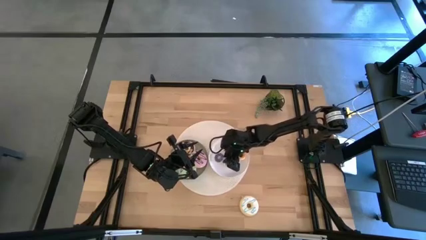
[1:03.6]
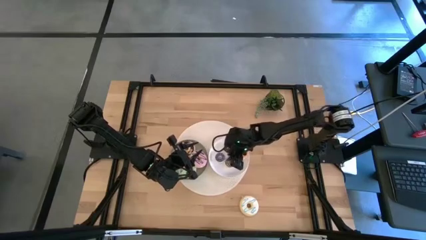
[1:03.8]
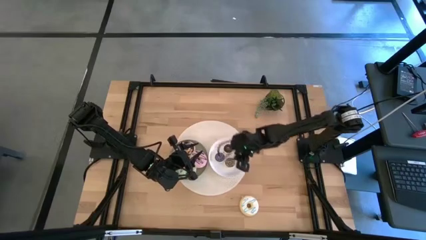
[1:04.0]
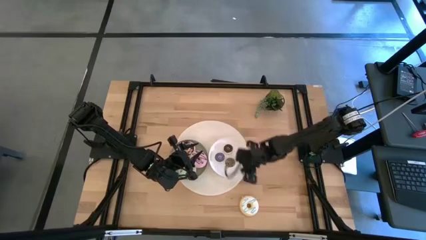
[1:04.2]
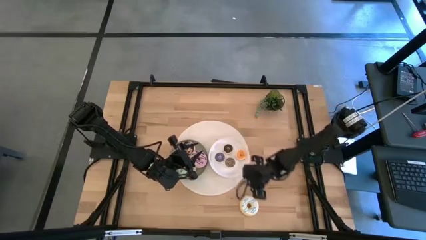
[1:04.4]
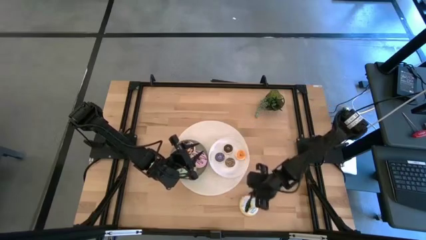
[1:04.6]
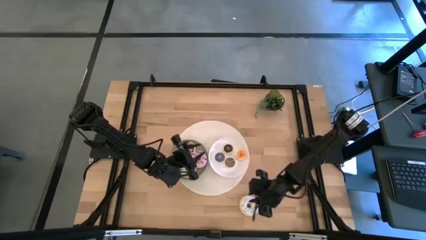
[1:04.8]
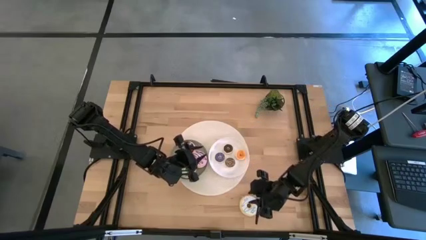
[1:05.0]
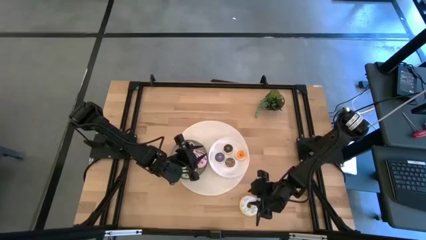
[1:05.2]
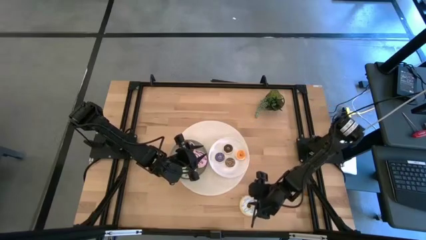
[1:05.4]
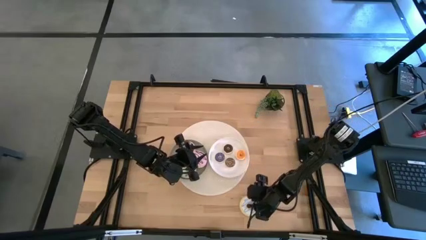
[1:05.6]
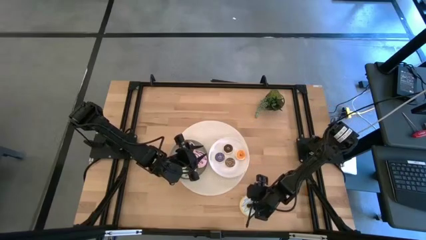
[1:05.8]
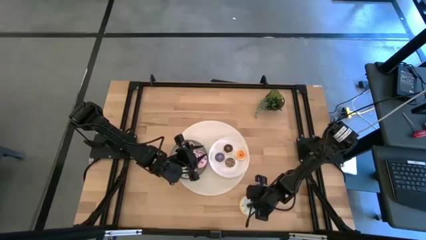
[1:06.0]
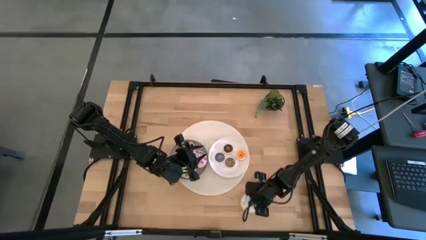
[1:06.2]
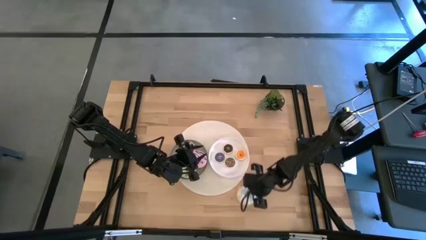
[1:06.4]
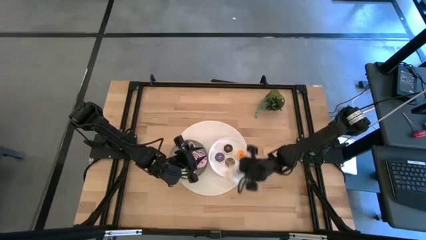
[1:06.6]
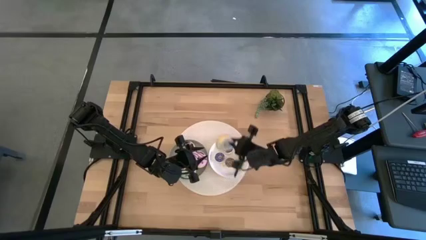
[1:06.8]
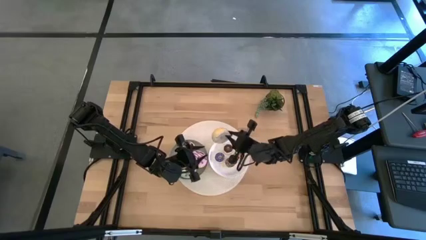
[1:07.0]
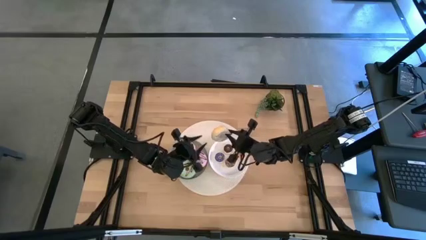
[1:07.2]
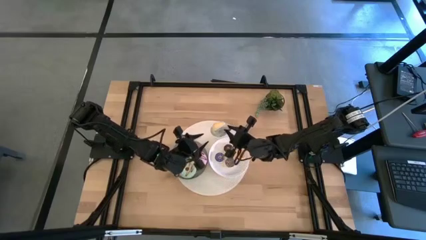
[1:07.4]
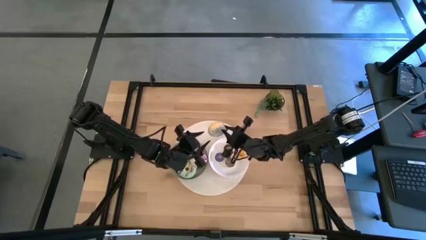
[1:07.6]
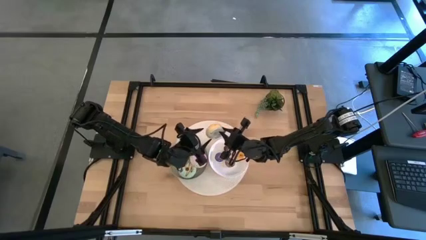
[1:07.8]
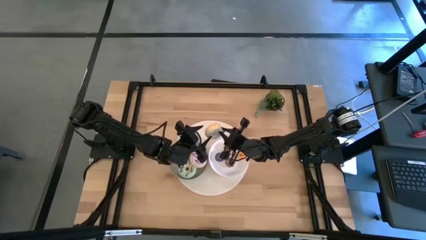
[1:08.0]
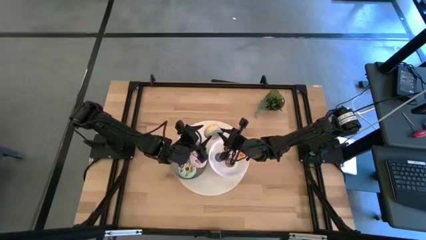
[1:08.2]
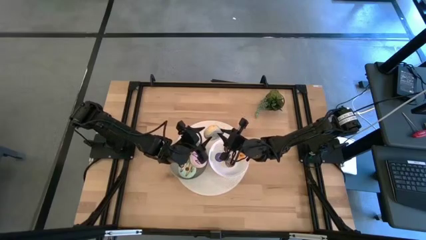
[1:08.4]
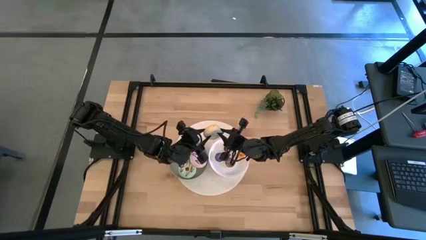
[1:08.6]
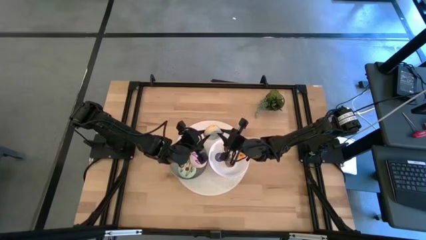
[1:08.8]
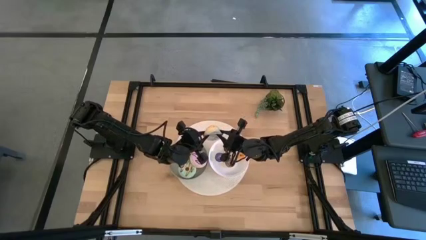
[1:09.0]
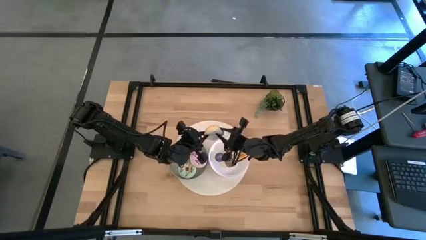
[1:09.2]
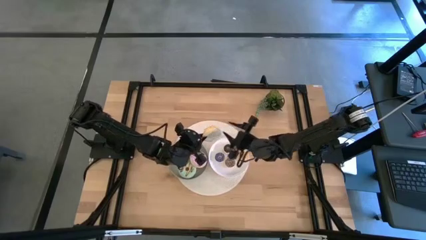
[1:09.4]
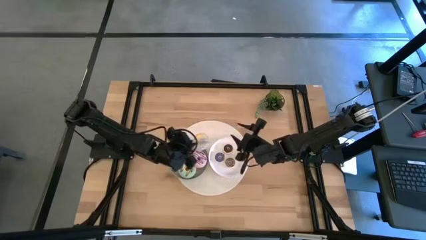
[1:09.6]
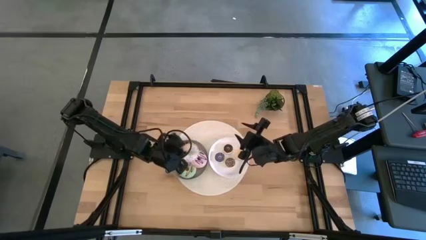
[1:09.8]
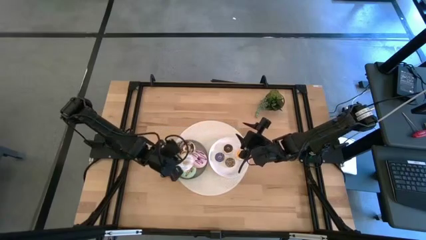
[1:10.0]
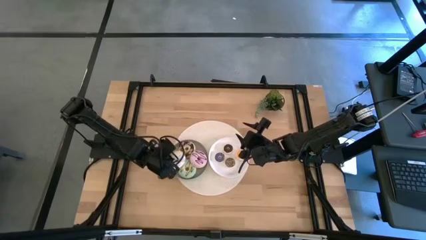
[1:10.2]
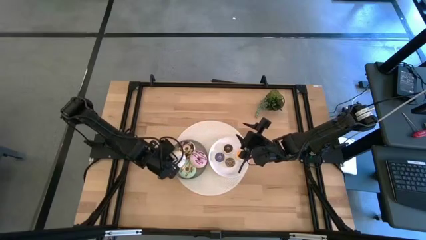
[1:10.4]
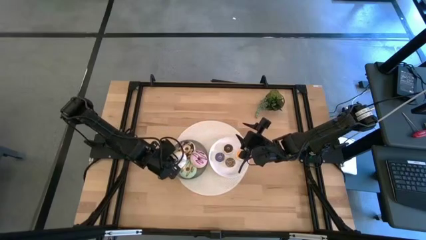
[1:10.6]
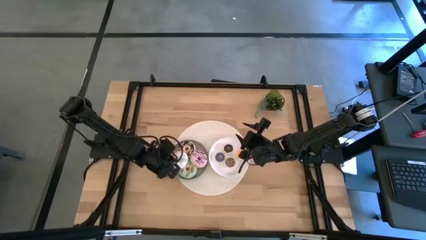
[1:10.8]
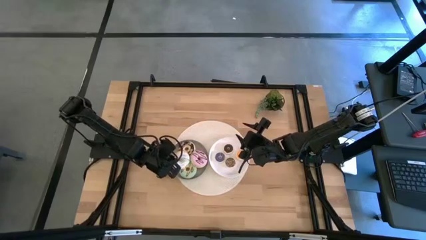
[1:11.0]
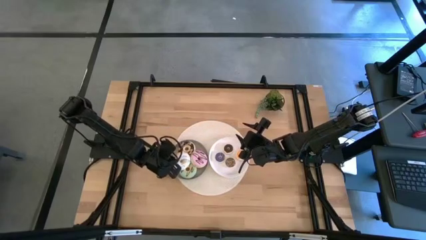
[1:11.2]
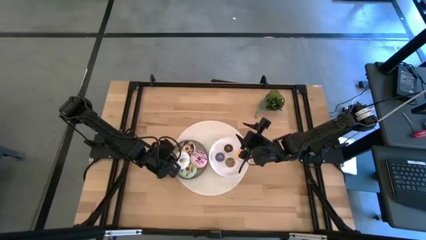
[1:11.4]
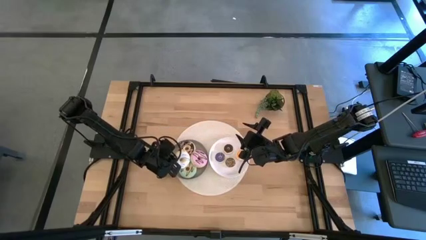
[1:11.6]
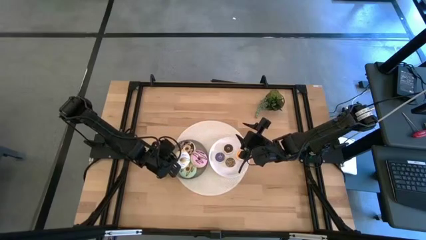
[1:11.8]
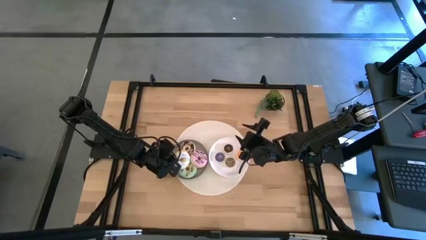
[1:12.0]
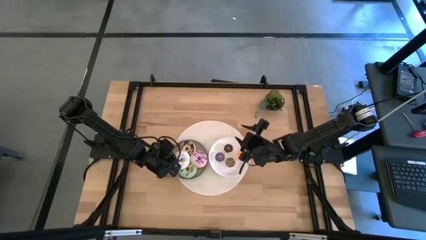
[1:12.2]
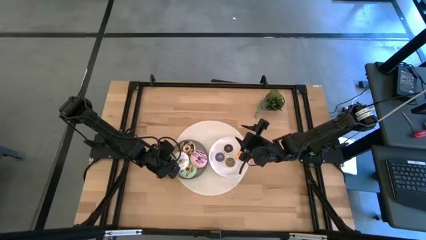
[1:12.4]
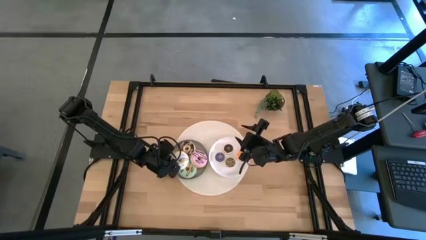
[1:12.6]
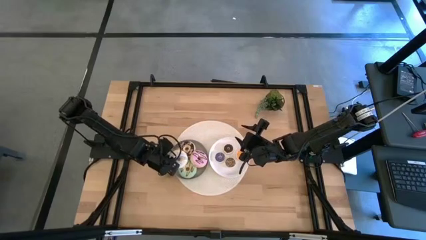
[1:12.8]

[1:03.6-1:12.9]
Task: Pick & Place donuts
Put the large white donut on the gray plate

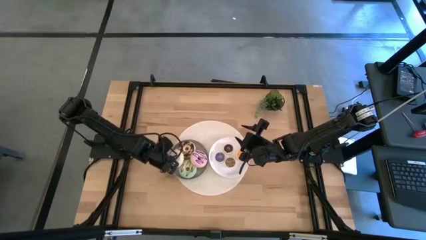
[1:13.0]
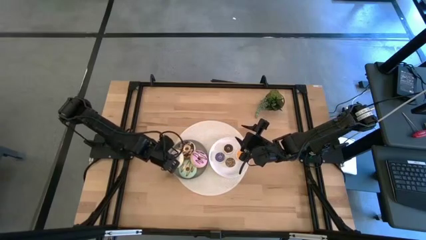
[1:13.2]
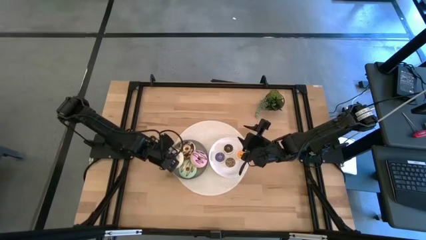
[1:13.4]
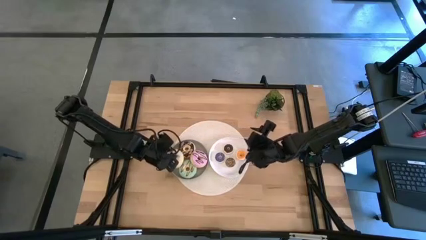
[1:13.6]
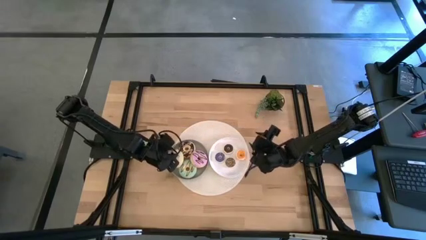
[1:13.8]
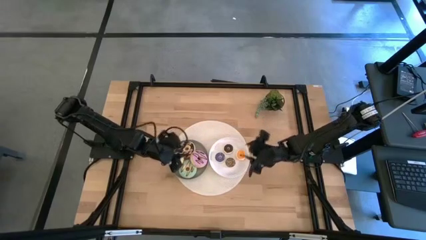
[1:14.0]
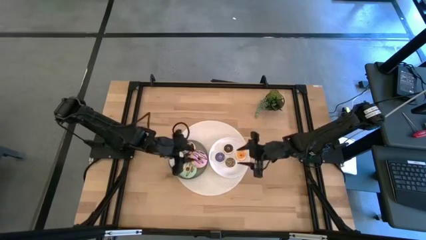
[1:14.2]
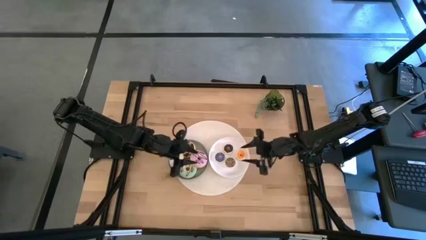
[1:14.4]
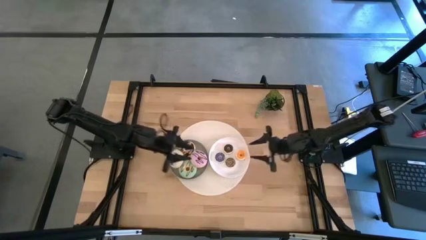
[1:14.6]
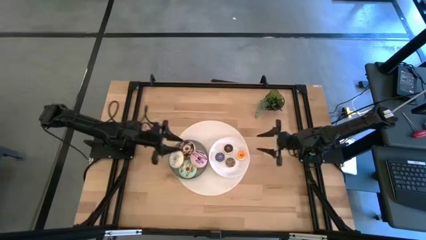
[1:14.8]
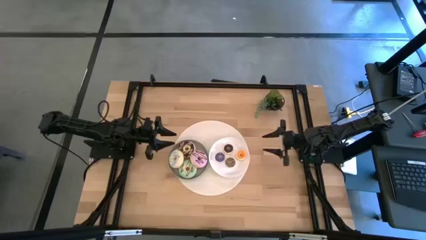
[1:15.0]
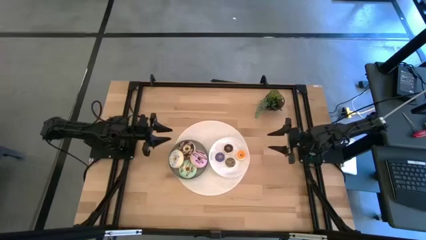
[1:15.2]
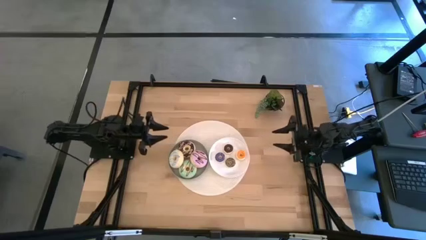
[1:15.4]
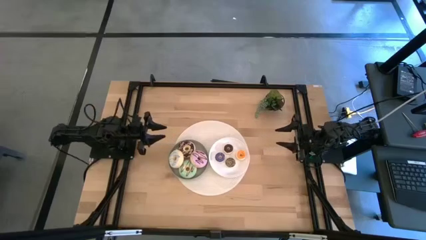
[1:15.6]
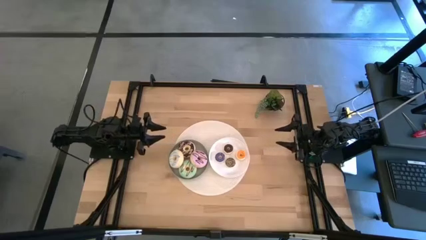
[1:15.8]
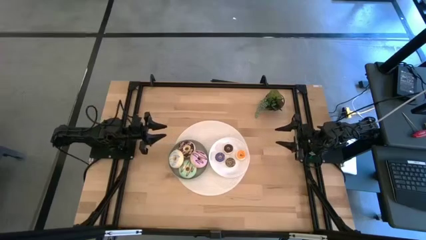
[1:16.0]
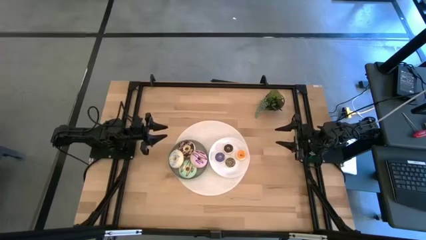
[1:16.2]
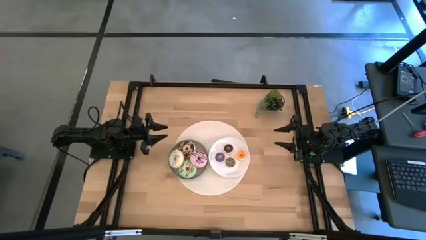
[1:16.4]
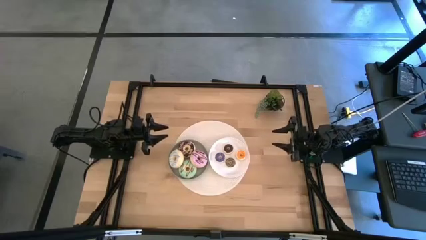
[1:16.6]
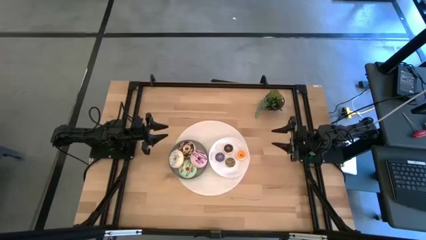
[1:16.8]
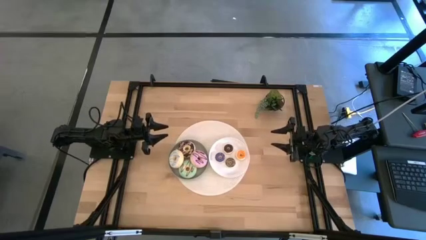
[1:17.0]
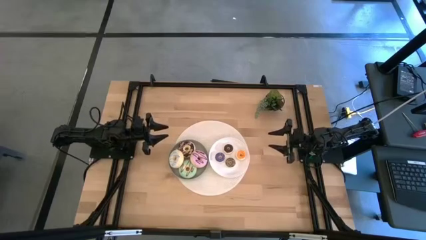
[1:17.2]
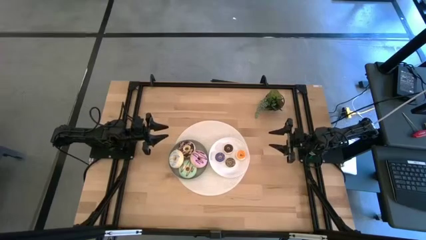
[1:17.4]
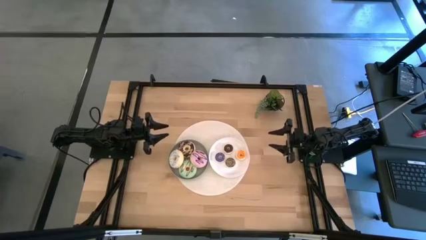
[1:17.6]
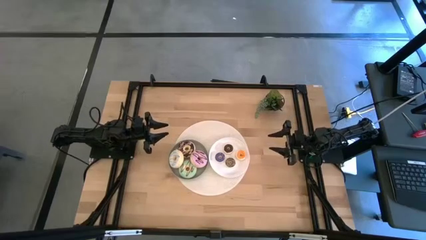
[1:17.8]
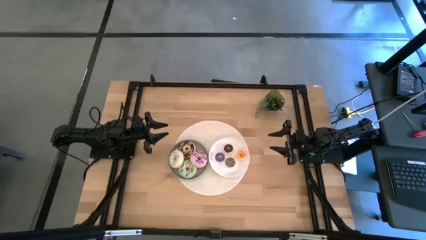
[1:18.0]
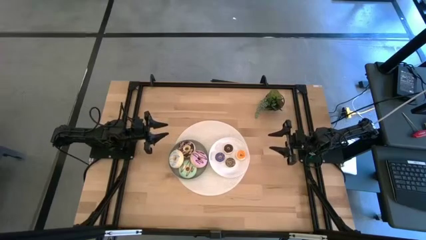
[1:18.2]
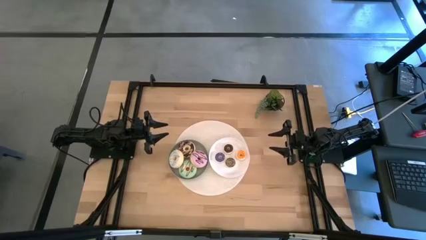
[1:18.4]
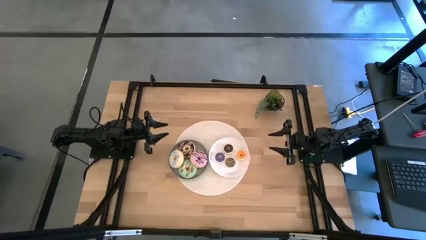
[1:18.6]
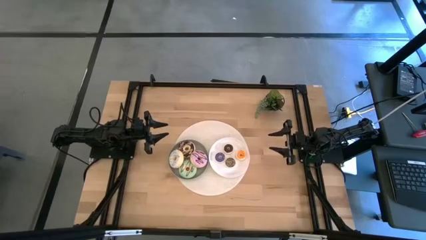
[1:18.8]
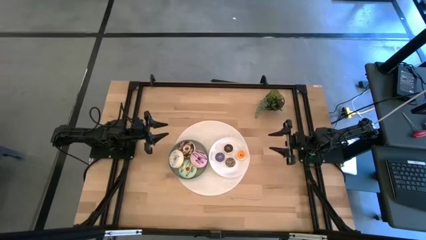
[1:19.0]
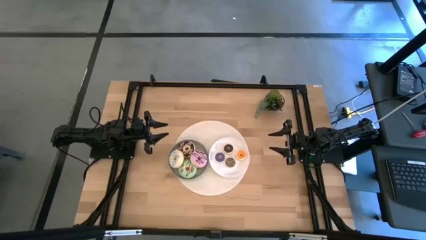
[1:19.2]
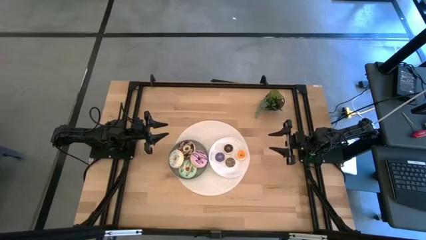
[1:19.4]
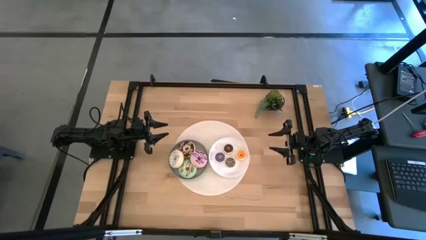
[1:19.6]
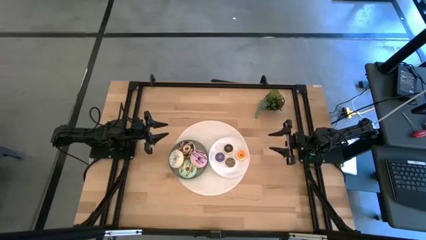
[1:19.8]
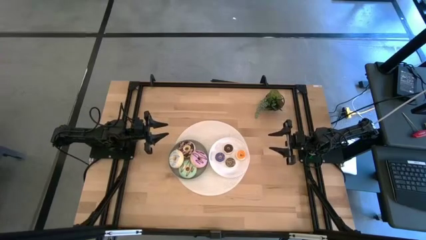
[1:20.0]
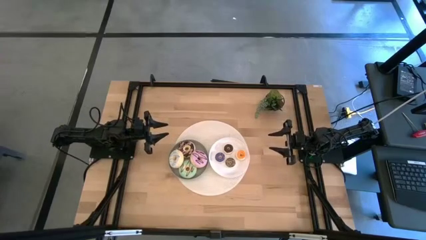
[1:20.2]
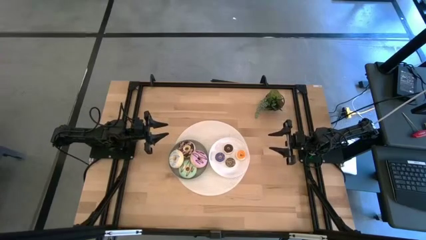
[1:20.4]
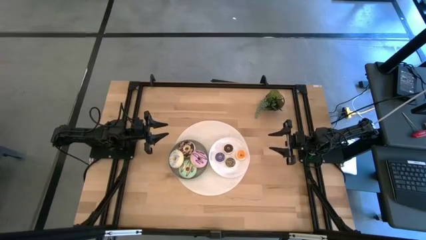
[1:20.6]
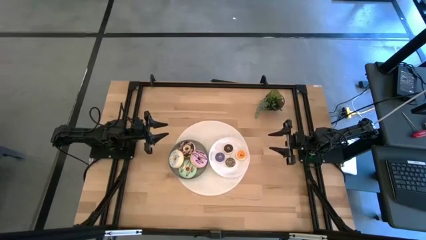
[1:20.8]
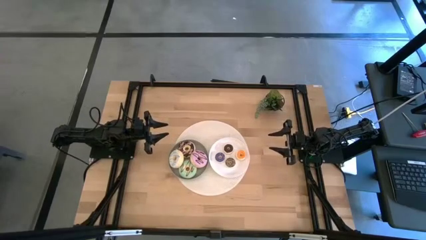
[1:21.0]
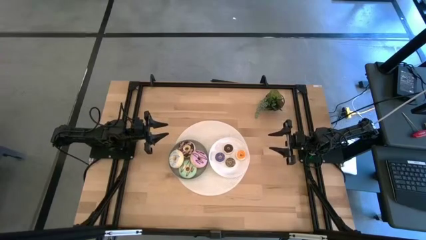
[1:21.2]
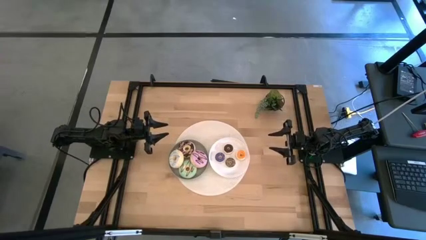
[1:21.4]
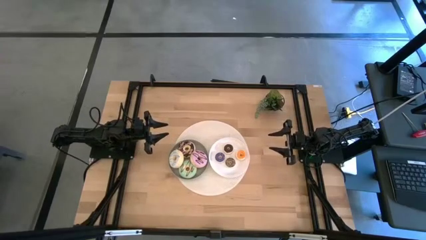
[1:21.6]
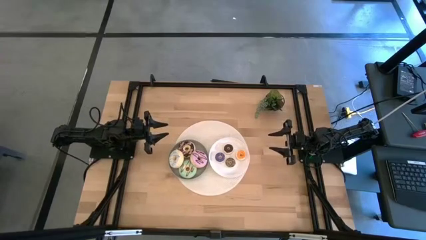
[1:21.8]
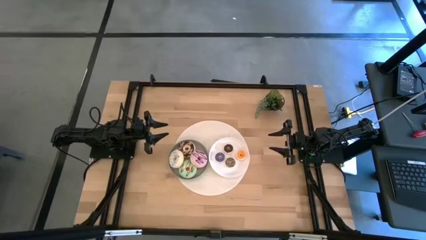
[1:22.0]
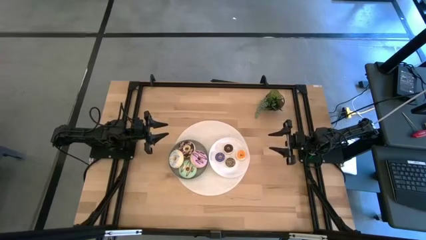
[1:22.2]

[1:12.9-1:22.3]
Return to Home Position
